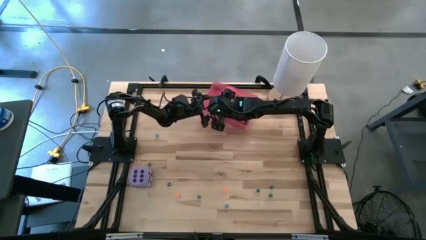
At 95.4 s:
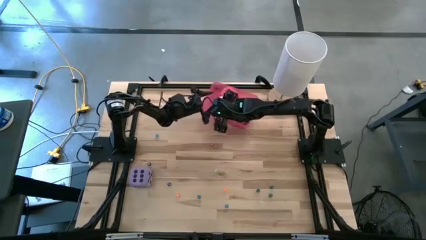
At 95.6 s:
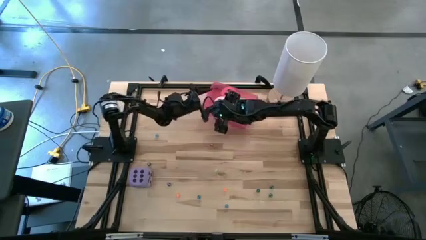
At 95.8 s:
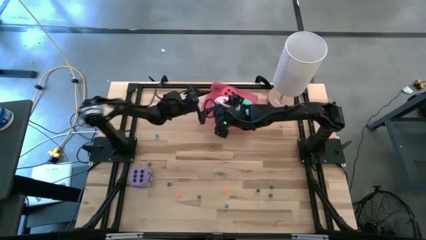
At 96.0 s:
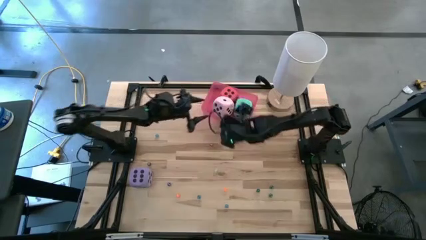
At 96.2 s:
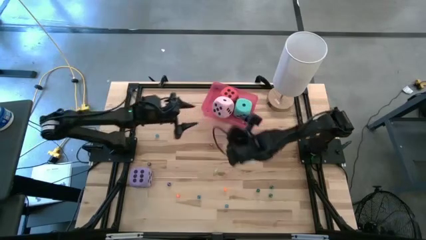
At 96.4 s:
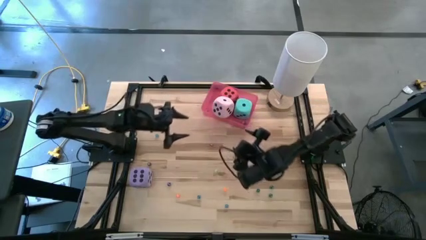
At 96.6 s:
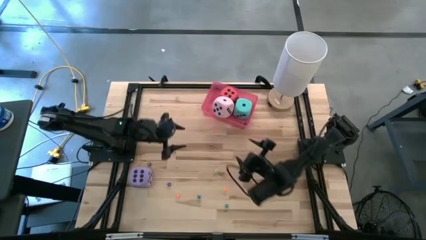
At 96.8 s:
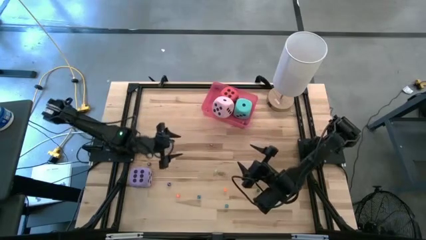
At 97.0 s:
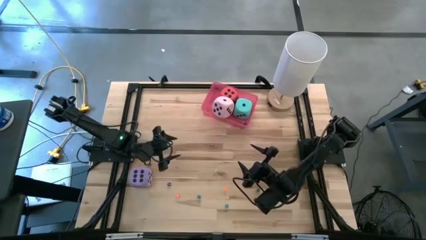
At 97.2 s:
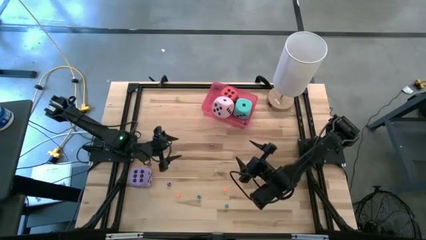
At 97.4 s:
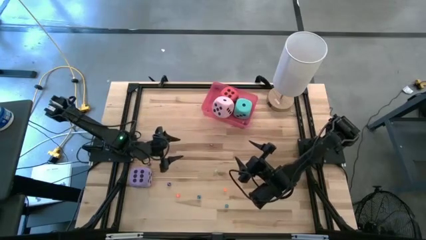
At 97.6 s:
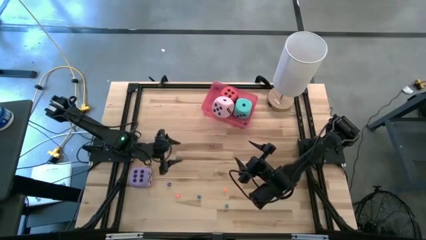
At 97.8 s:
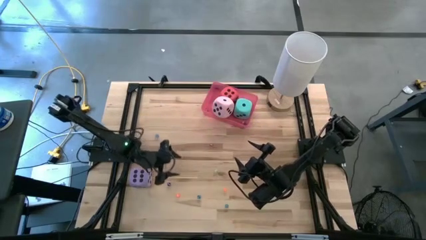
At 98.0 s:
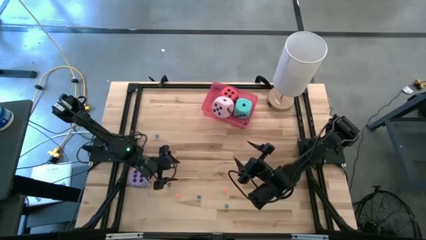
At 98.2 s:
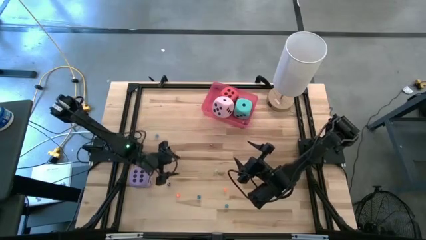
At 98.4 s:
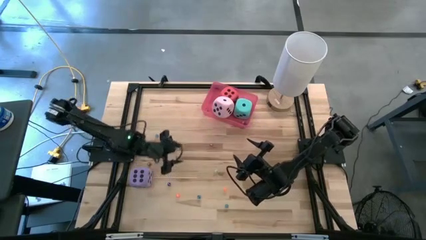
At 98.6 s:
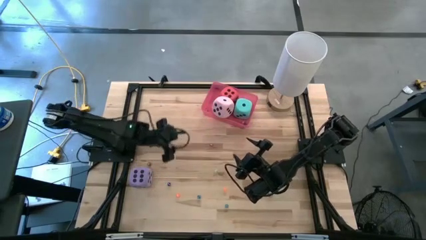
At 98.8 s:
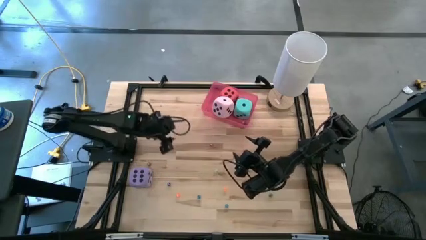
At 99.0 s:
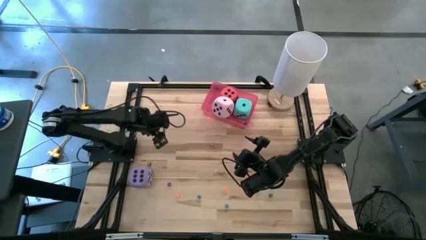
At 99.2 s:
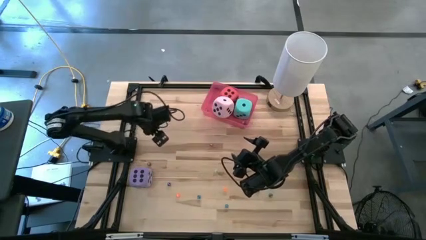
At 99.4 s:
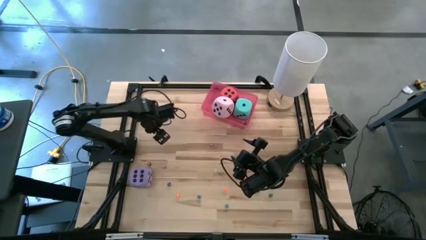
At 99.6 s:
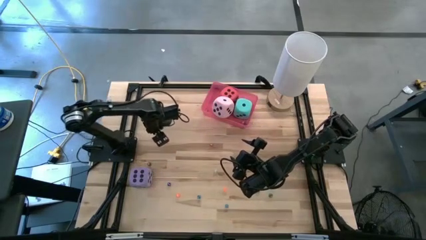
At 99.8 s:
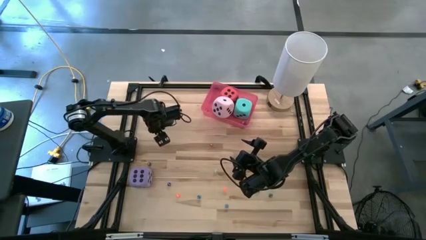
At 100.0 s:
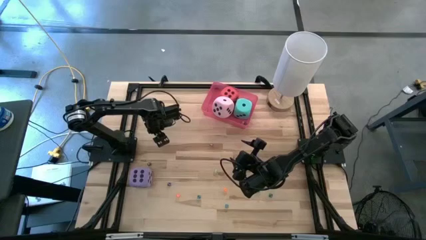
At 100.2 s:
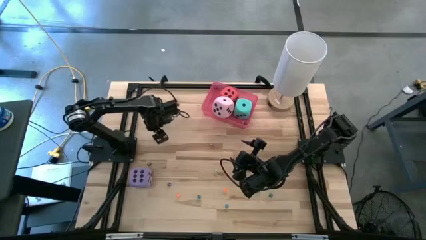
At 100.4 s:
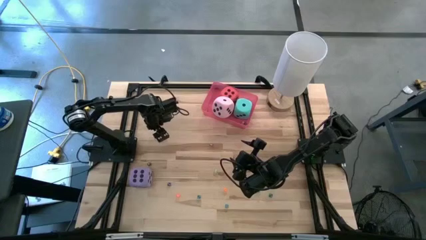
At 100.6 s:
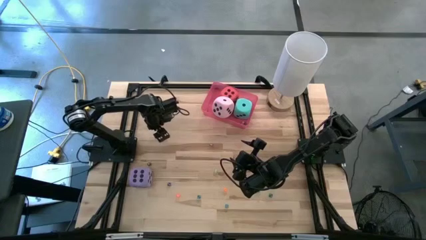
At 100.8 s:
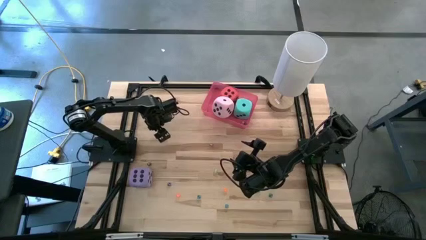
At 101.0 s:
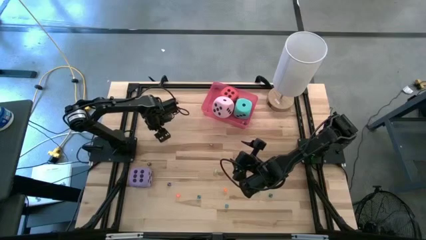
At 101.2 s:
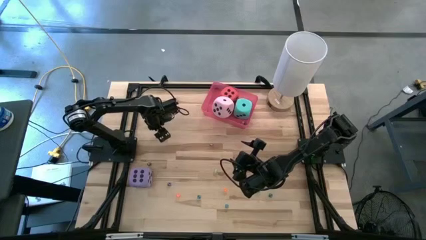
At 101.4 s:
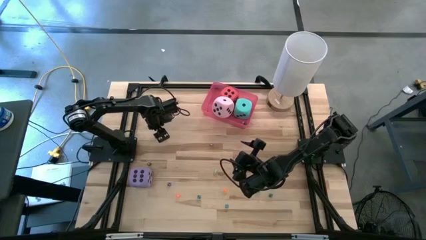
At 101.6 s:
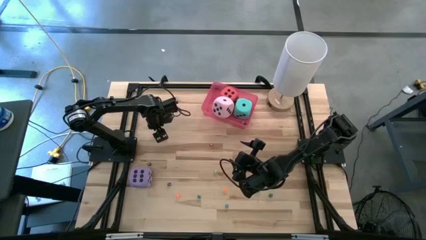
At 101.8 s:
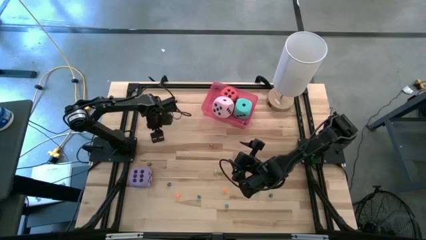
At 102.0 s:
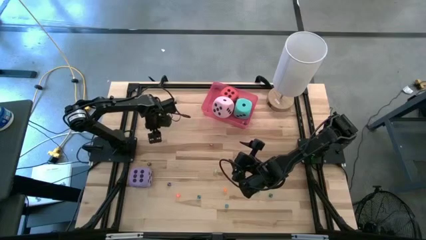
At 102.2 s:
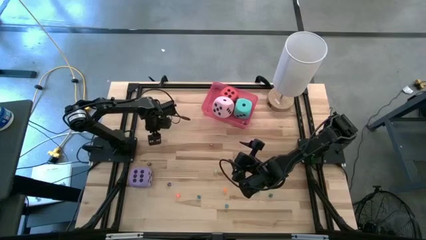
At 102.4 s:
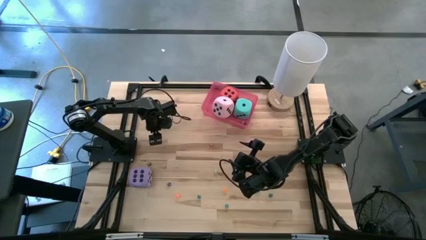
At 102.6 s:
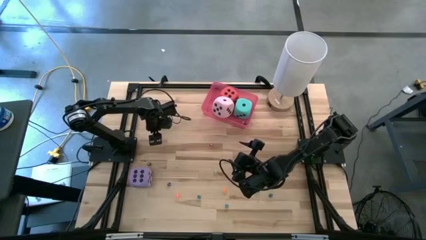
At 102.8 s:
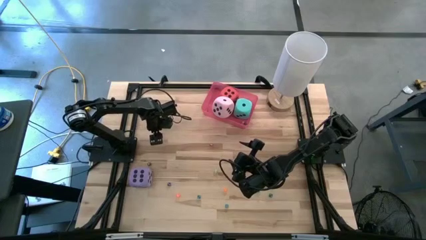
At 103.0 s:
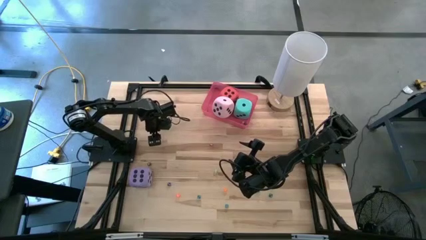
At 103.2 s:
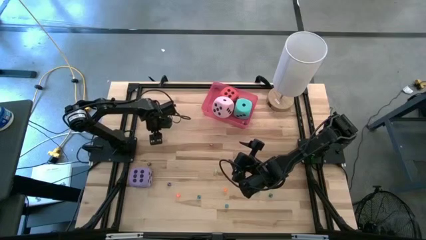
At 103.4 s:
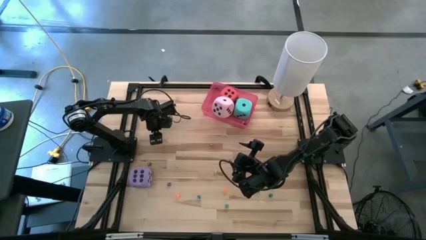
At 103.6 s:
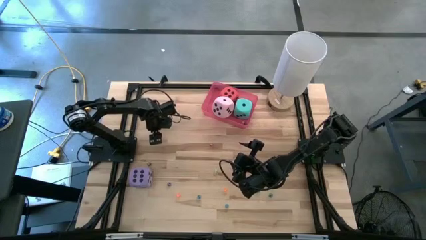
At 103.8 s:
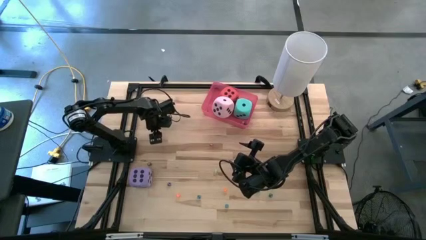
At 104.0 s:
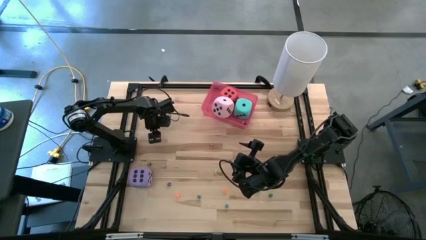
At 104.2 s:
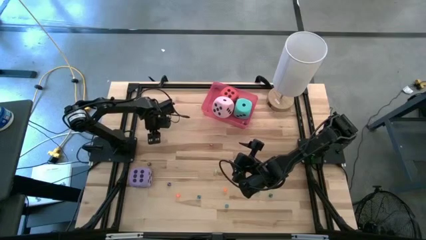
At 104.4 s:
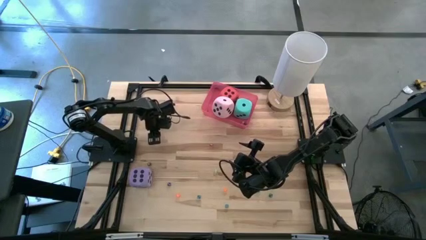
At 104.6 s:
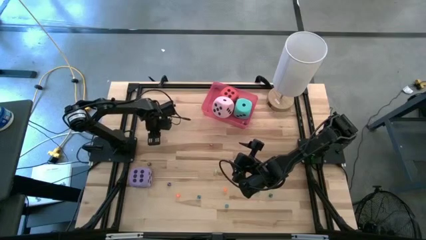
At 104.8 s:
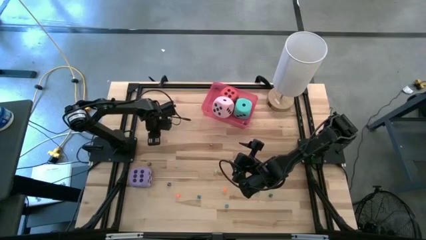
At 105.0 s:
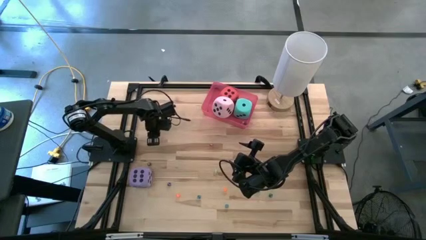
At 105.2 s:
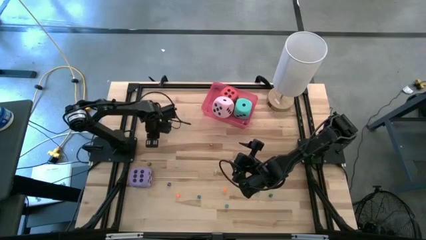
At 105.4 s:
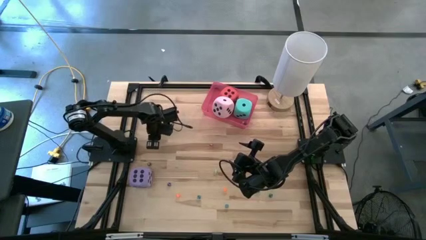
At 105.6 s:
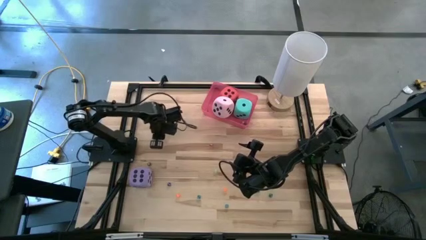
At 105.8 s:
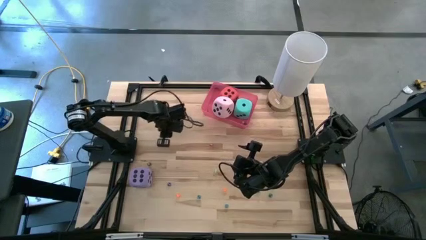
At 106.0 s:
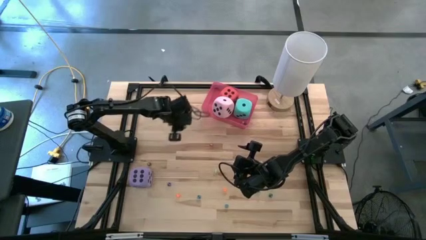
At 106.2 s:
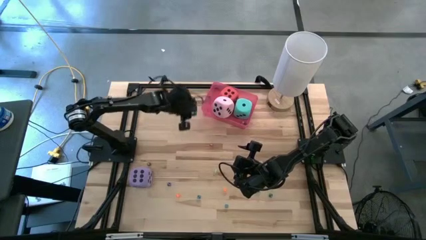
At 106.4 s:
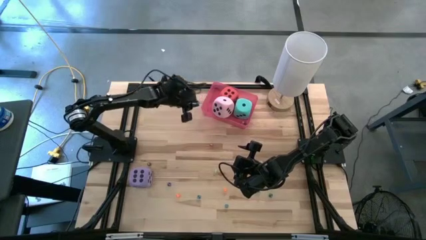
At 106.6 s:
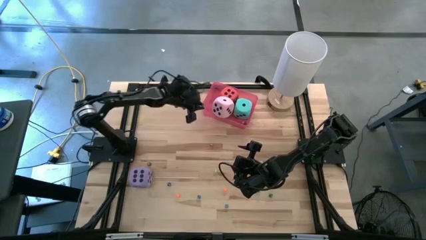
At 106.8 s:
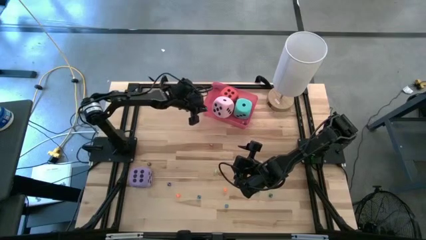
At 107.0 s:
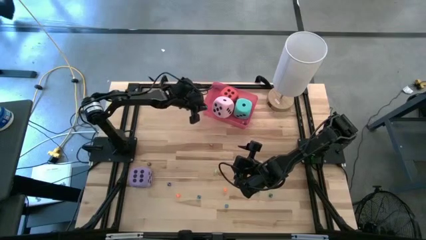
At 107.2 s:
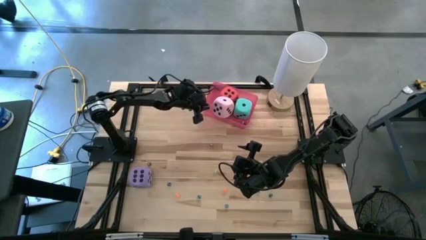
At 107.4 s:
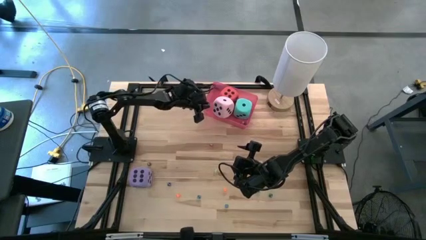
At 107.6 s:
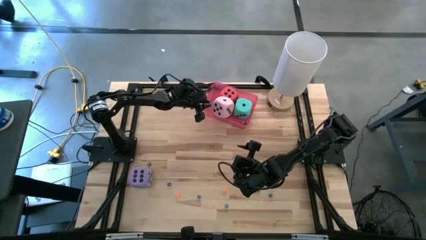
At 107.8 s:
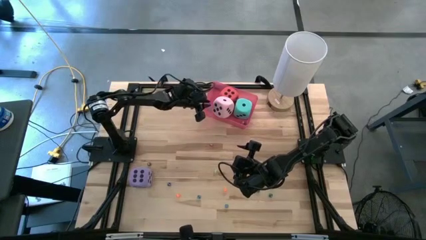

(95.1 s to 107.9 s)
Task: Pick & Place Dice
Put the small blue dice into the pink bin

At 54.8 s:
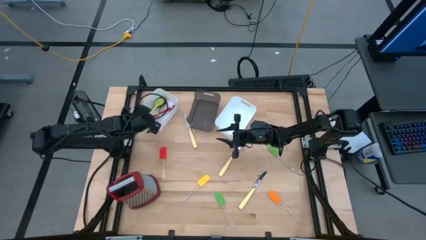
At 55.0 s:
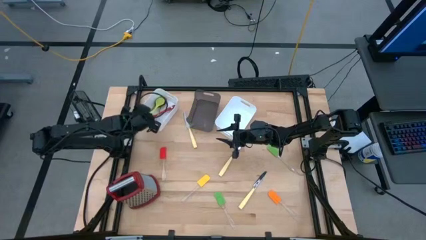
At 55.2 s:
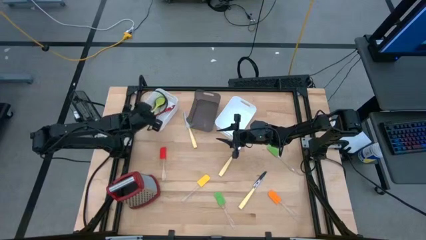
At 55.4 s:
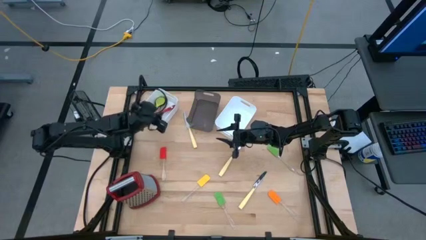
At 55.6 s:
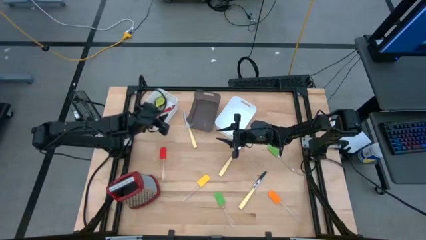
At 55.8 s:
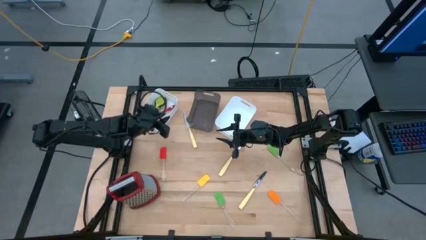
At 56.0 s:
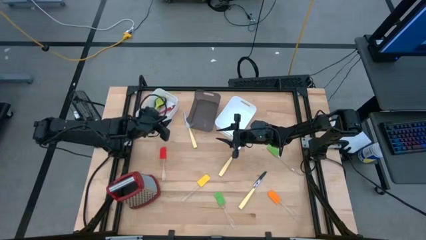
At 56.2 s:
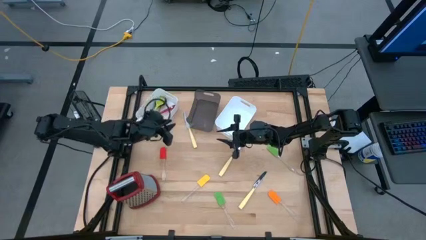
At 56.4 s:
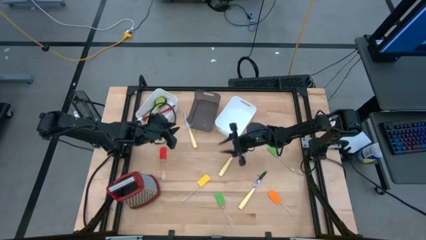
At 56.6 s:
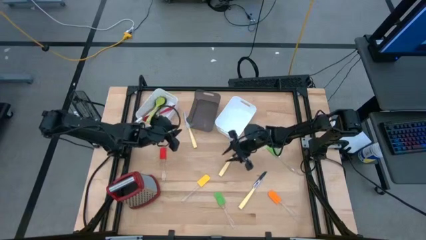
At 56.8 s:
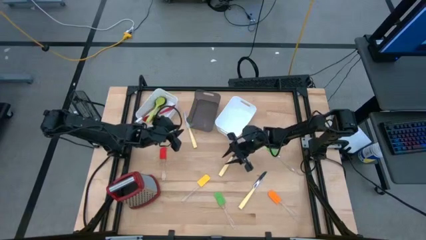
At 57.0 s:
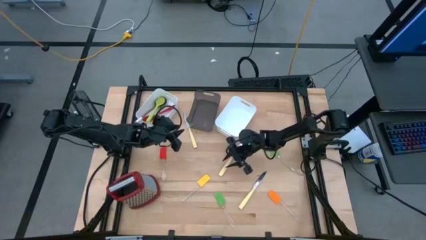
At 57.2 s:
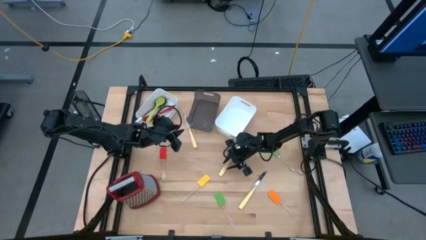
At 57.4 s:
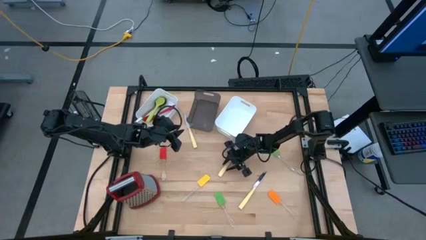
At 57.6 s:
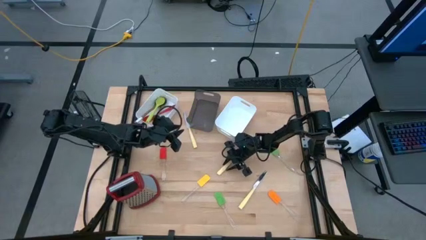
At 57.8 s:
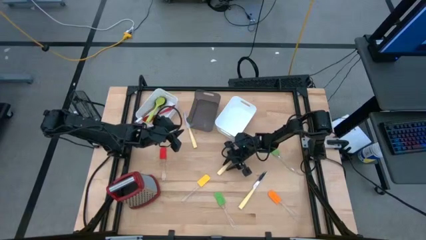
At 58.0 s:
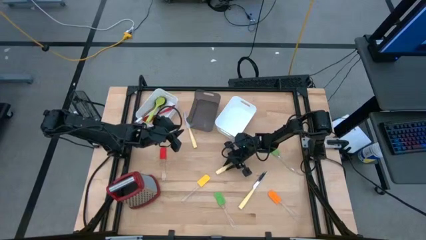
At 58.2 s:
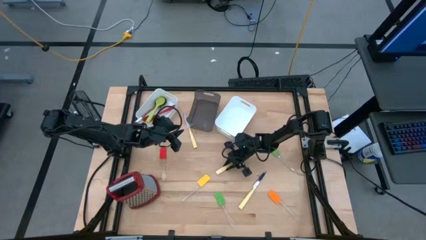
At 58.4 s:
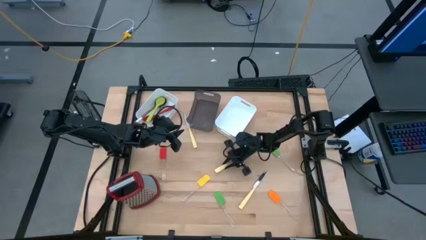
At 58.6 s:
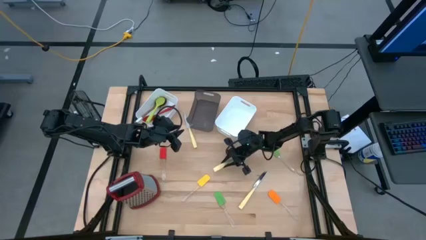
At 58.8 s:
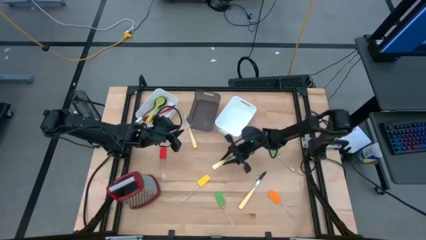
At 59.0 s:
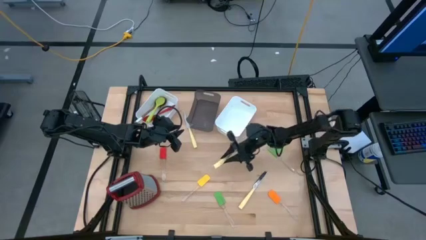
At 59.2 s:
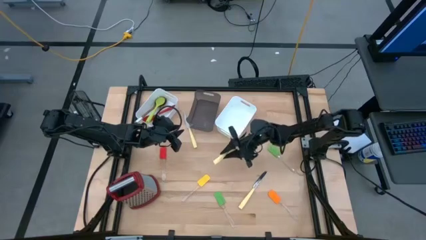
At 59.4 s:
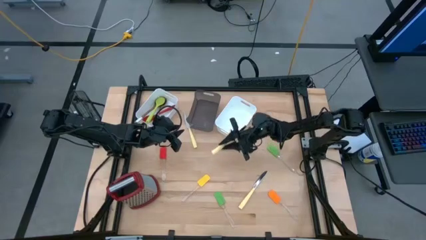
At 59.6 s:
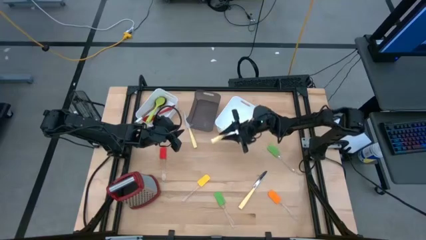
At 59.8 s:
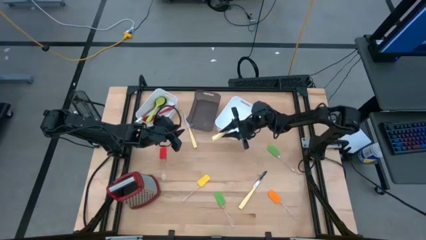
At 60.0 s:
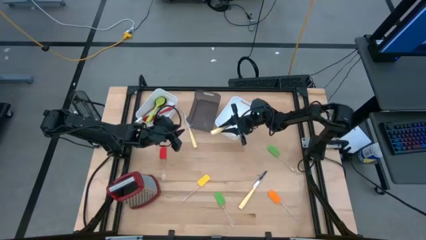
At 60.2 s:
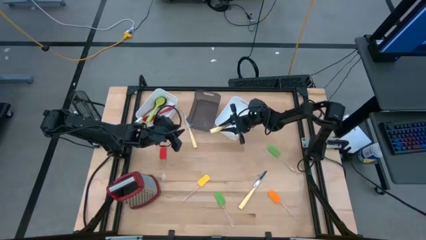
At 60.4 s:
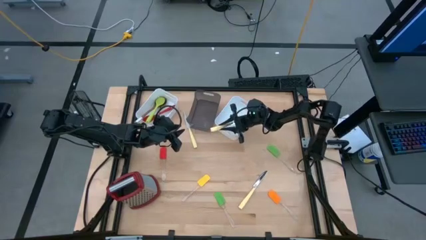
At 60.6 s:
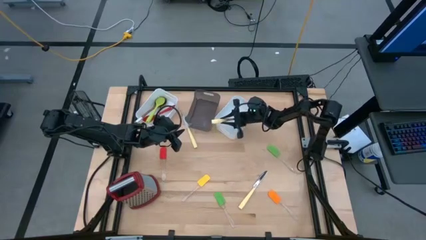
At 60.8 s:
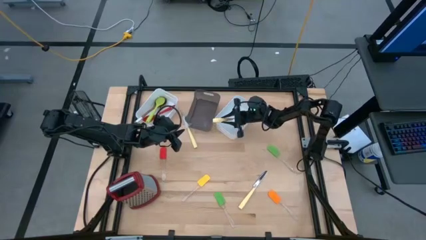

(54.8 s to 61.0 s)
Task: Pick & Place Kitchen Items
Put the middle yellow knife into the right white bin
